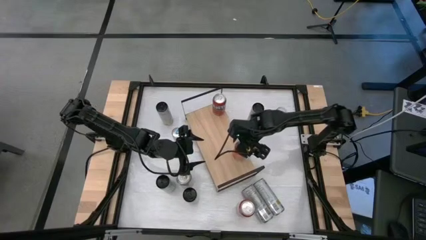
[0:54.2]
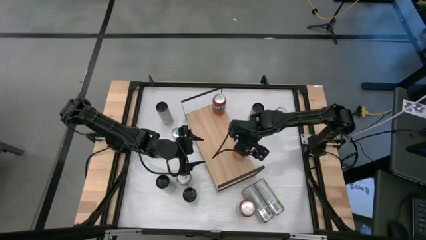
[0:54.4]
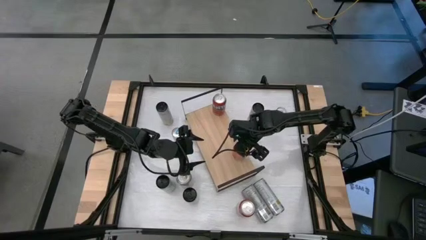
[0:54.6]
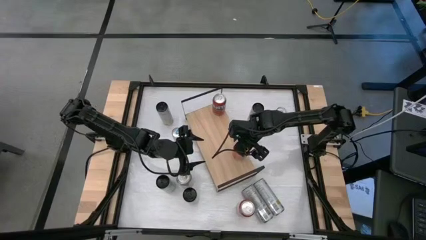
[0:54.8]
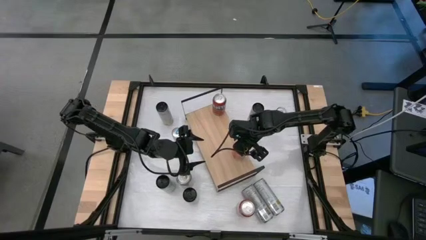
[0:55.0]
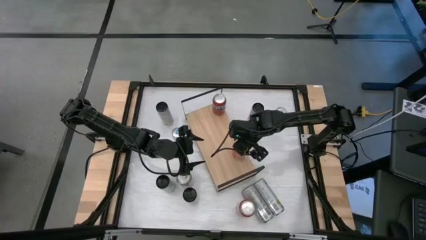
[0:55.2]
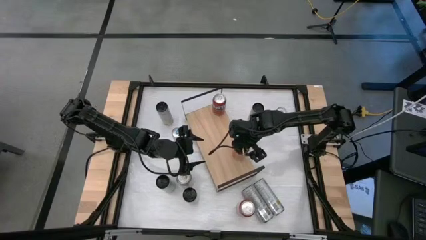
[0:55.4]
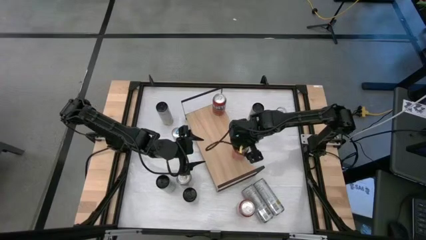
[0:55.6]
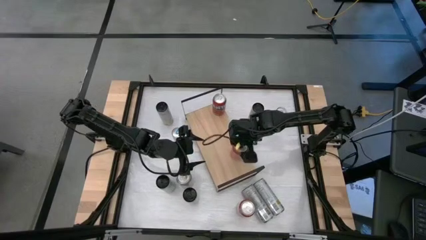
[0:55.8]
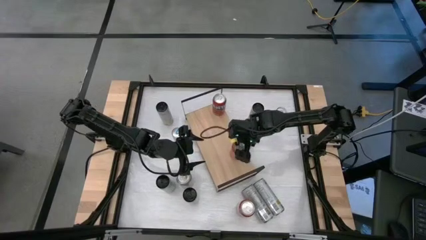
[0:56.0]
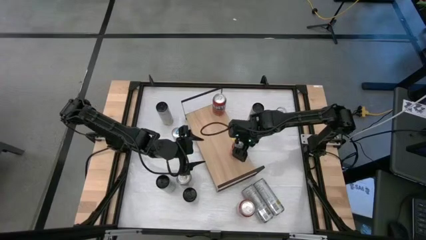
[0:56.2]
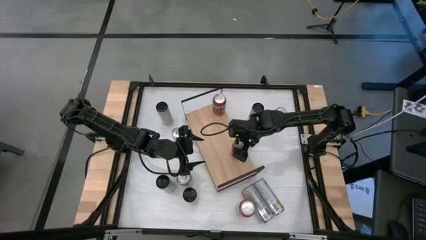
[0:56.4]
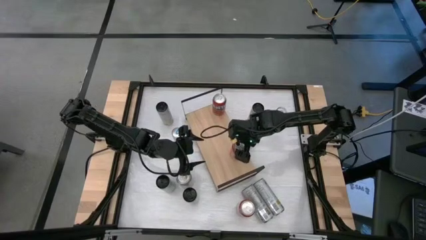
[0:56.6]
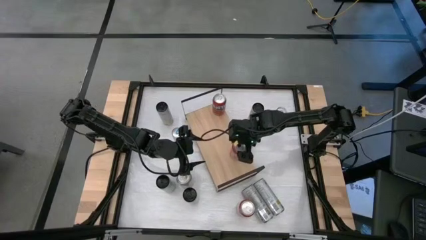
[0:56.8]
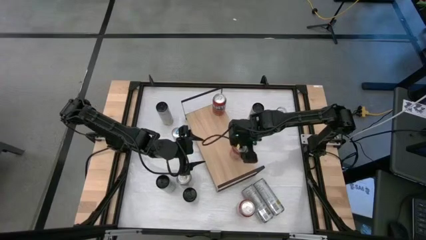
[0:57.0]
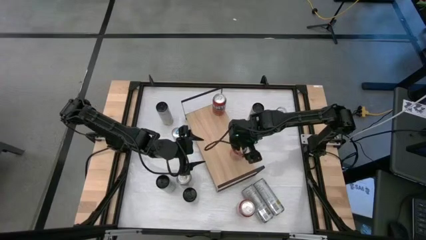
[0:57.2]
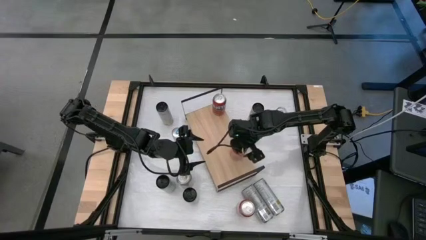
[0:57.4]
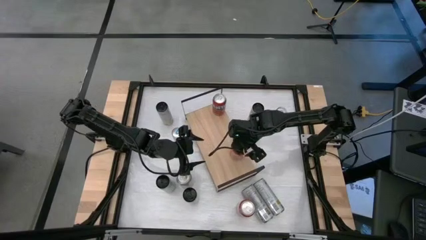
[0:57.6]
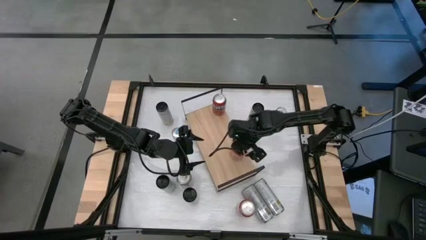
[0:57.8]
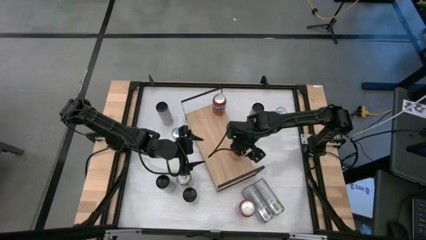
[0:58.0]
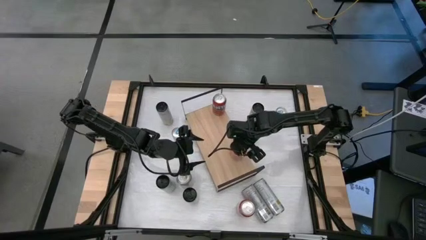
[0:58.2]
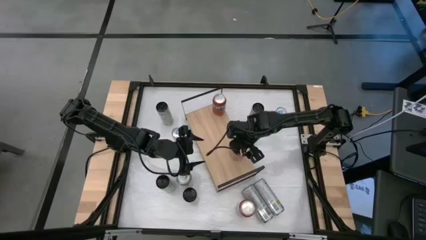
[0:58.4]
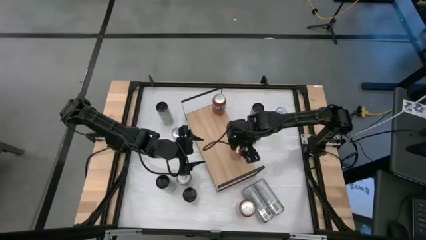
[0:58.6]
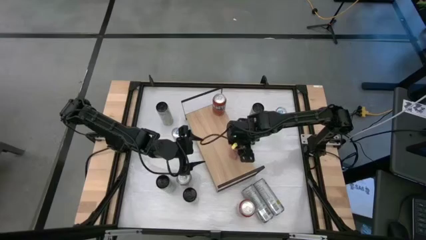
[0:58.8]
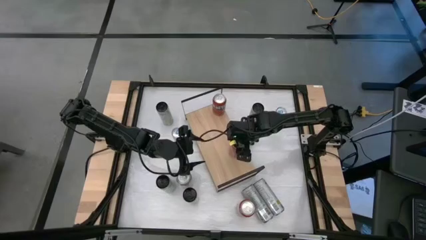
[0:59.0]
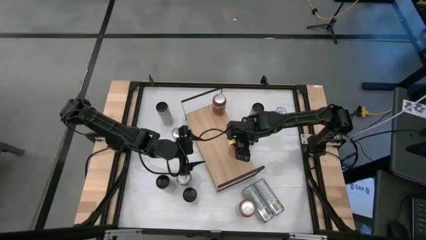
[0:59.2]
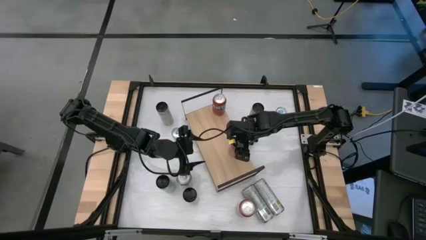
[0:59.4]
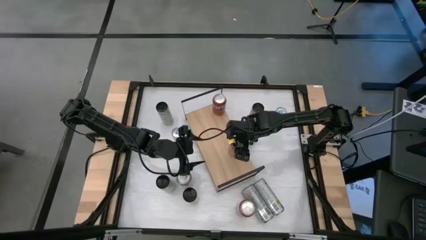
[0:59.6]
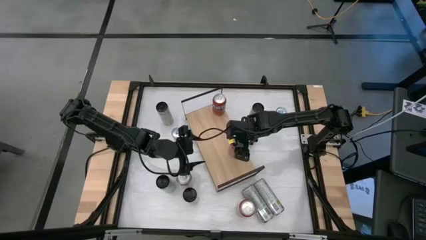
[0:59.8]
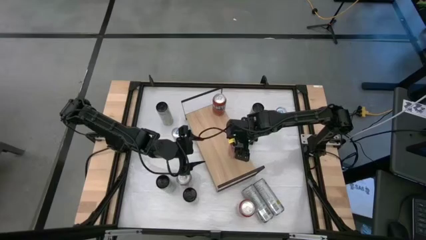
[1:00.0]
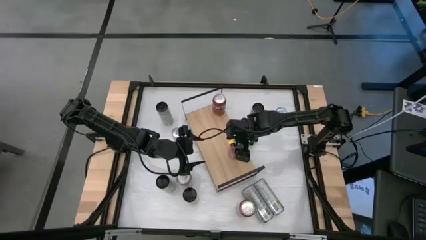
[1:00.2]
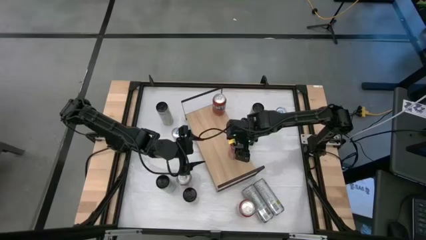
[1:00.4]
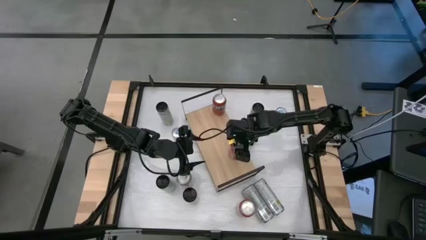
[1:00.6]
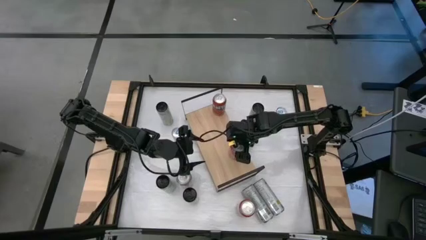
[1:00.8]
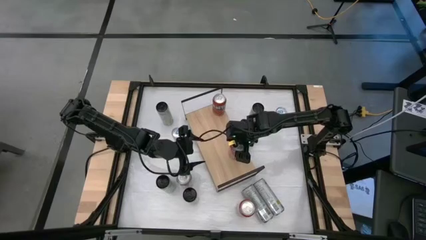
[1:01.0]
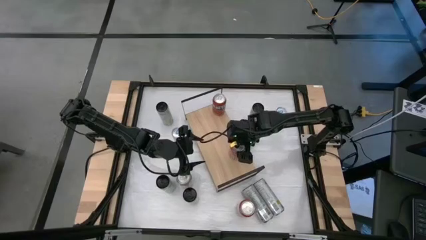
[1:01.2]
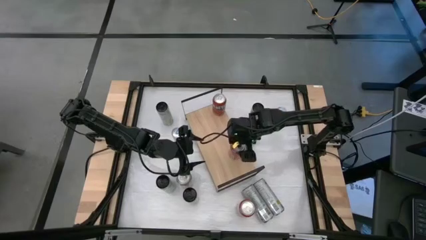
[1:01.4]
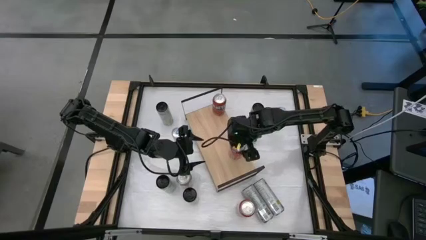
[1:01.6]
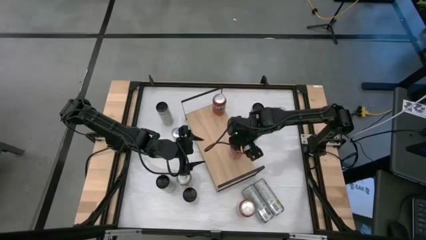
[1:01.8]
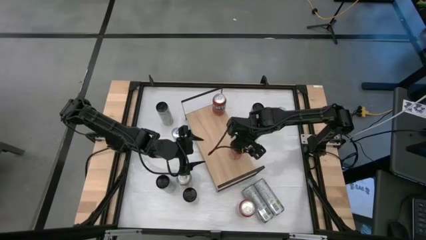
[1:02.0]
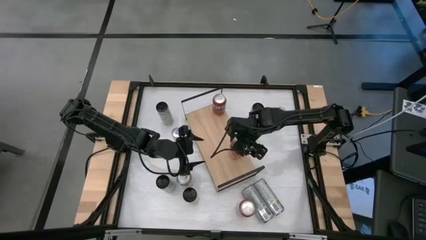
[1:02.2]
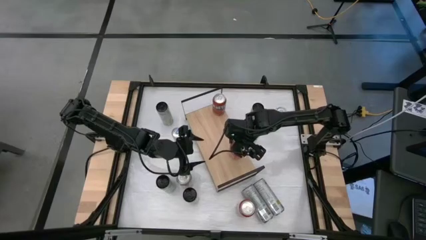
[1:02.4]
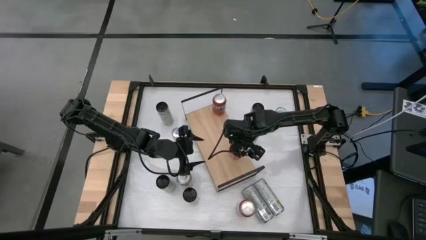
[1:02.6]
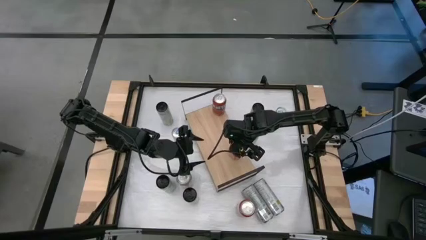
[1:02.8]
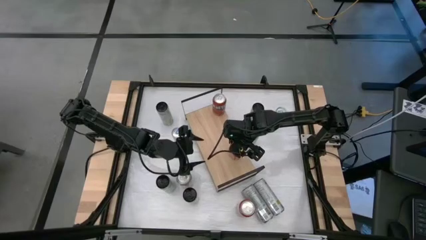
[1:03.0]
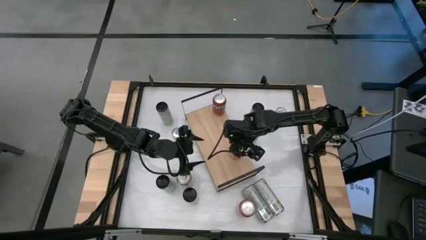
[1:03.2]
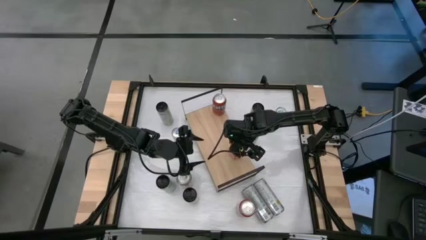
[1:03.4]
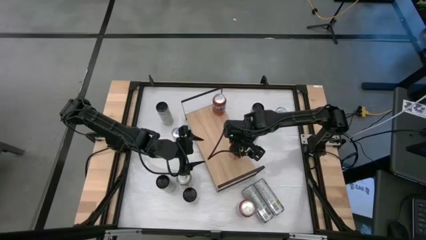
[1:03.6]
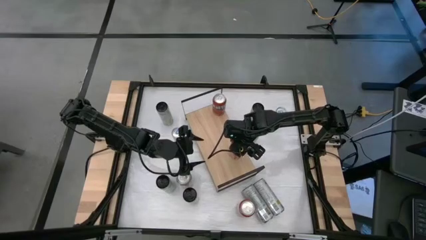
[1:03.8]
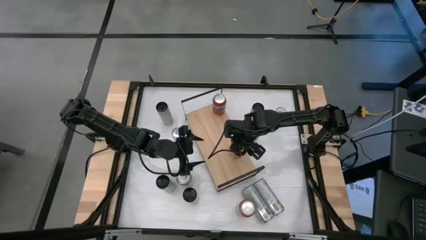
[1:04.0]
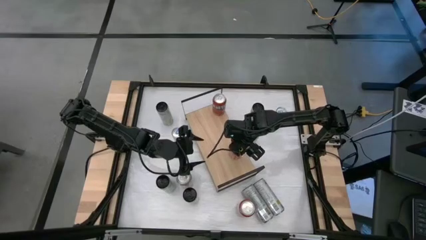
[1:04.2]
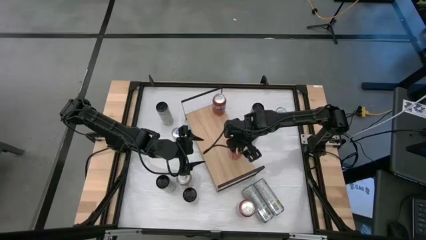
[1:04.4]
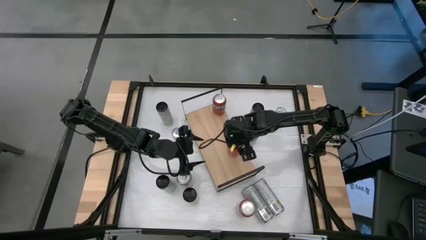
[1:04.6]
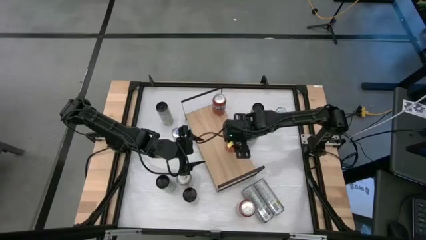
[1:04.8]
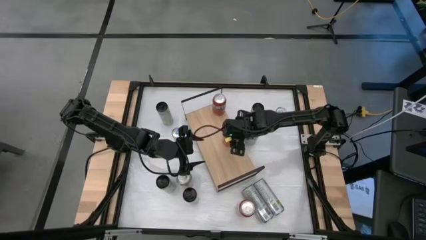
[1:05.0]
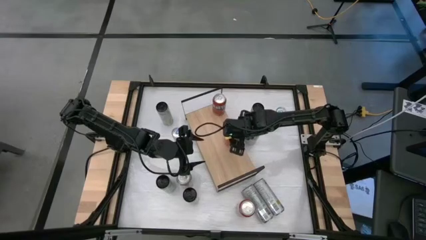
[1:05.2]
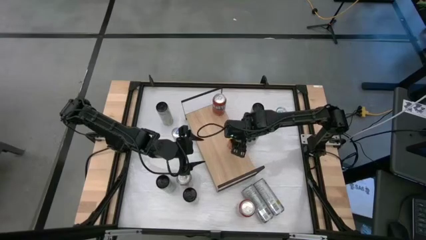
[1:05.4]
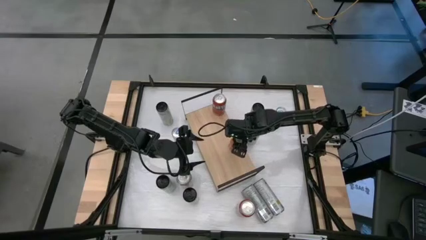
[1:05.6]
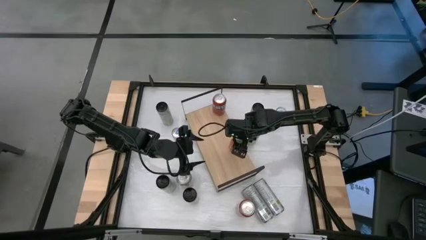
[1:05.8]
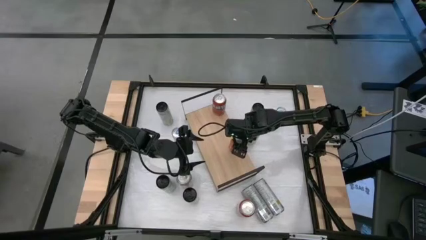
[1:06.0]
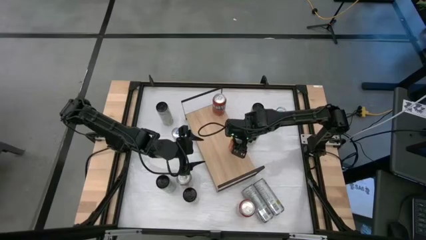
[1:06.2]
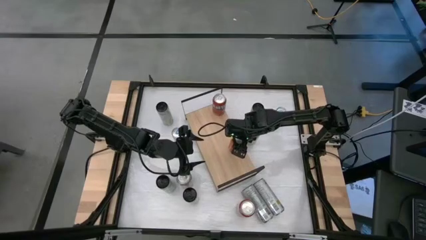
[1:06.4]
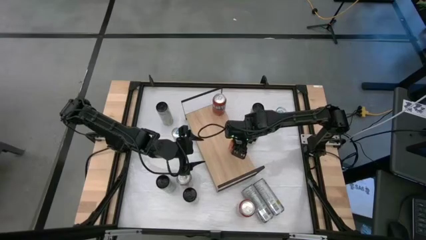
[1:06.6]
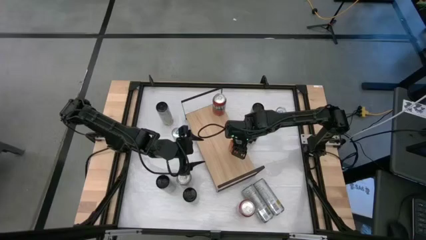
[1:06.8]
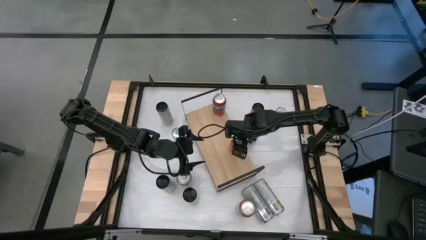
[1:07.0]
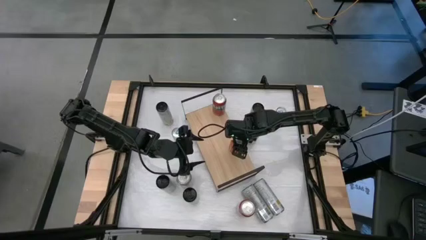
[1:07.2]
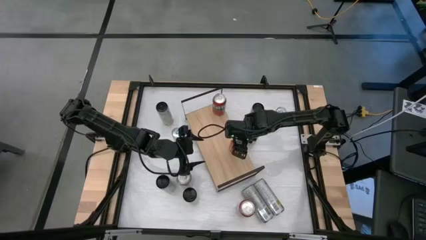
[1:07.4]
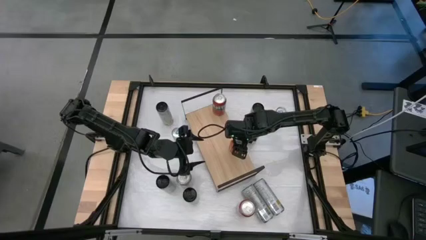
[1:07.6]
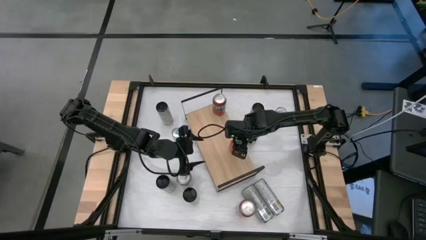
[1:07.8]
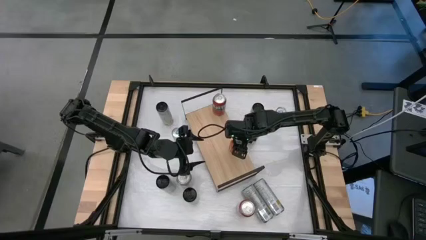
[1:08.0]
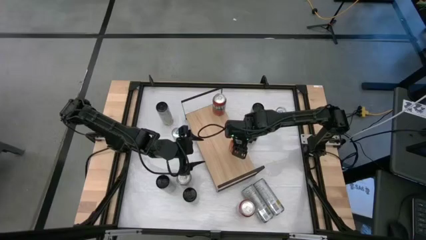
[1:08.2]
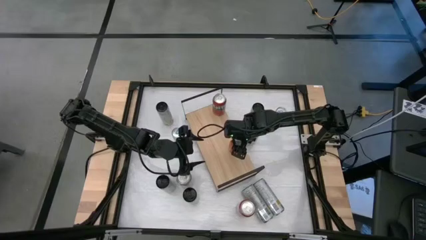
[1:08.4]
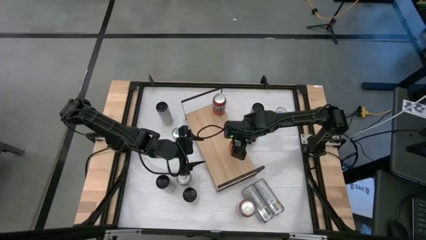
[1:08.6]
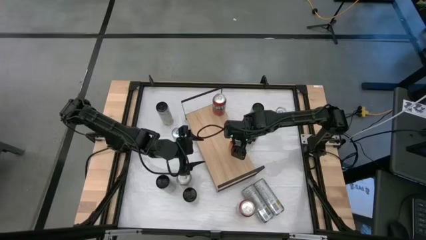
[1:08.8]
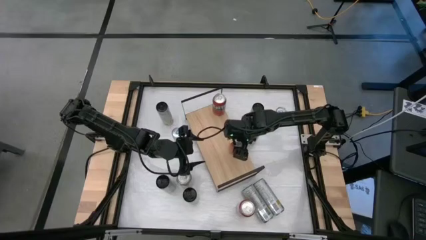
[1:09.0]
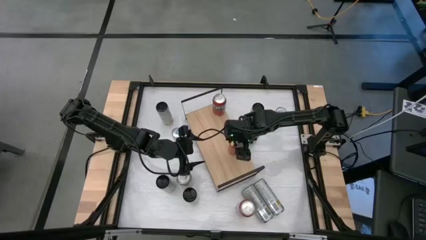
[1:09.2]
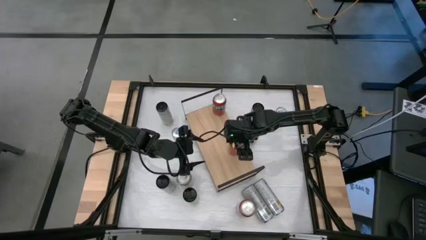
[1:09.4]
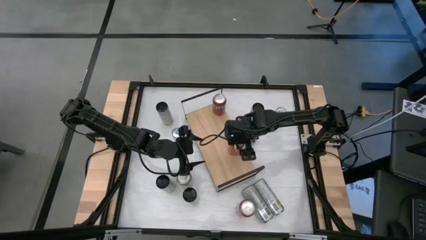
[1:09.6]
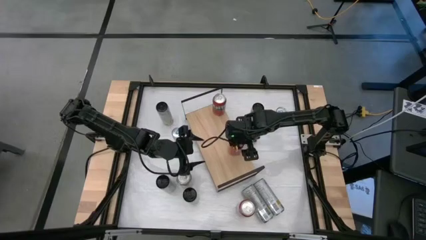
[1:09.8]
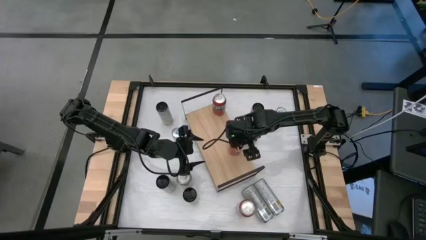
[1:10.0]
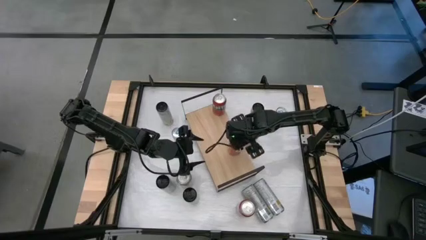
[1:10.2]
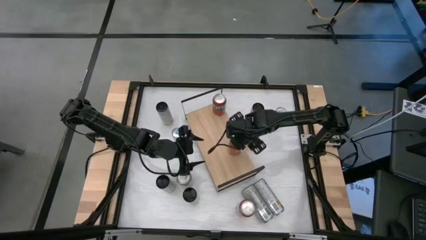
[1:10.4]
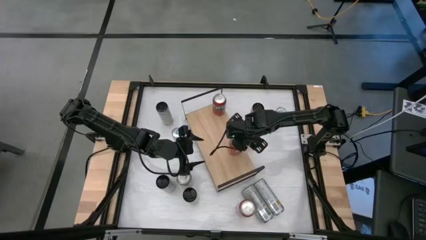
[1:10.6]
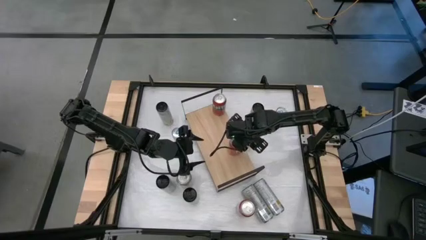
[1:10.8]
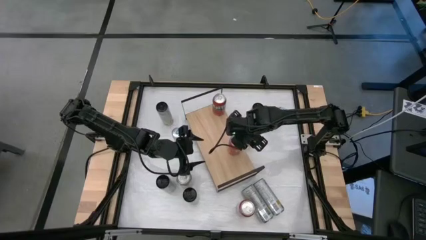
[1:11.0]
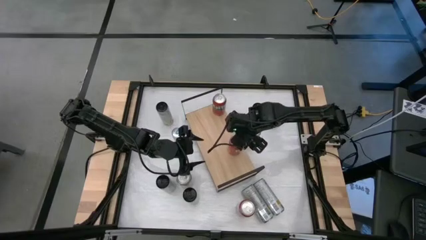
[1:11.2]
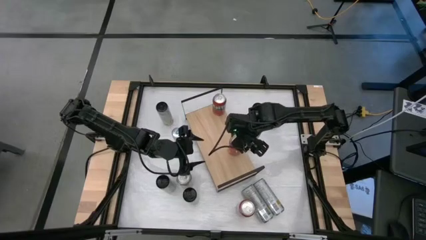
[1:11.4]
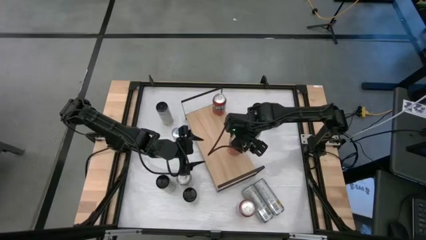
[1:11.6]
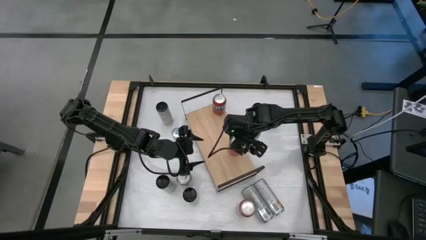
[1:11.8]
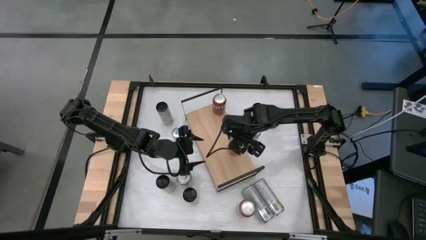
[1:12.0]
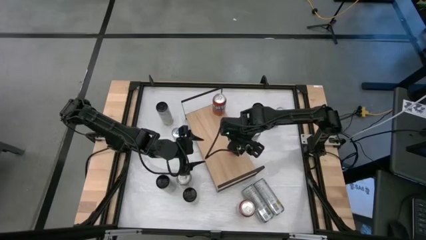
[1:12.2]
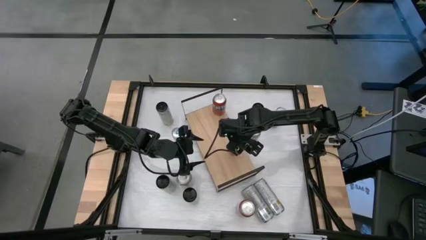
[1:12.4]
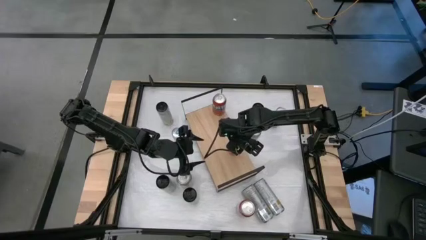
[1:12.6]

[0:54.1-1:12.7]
Task: Place canned beverage on shelf
Align the left orange soda can with the other orange soda can
